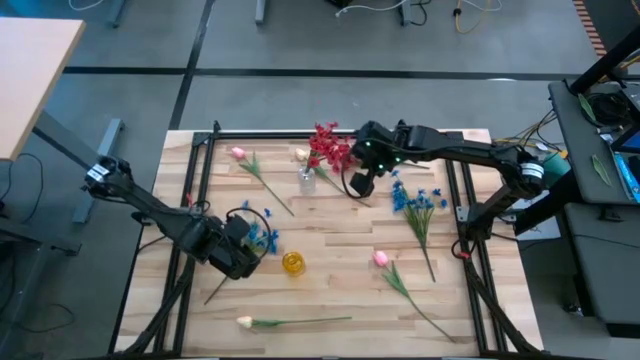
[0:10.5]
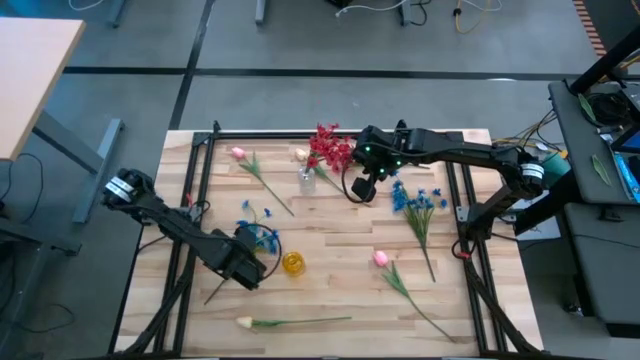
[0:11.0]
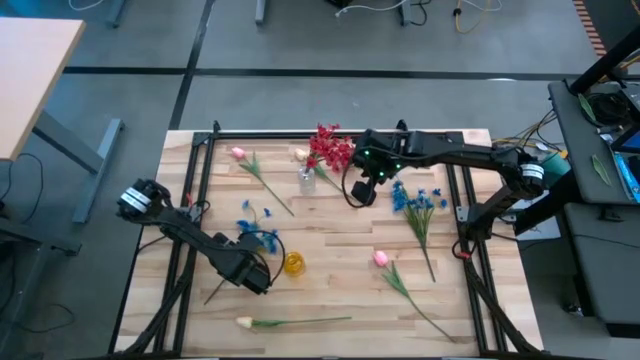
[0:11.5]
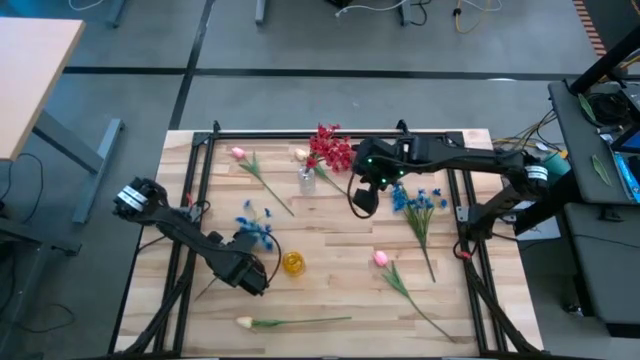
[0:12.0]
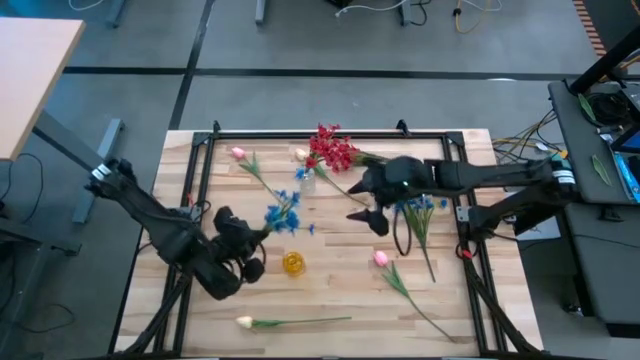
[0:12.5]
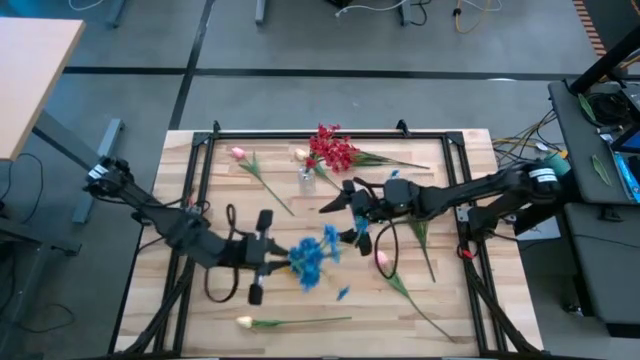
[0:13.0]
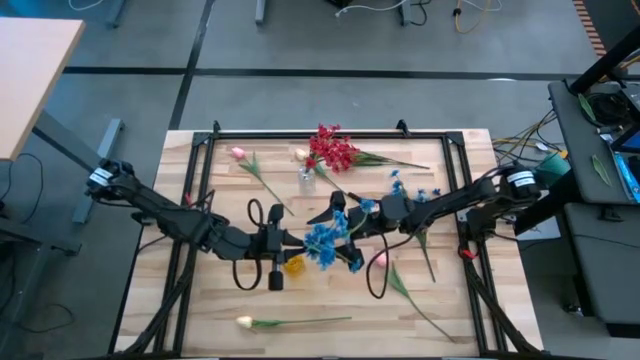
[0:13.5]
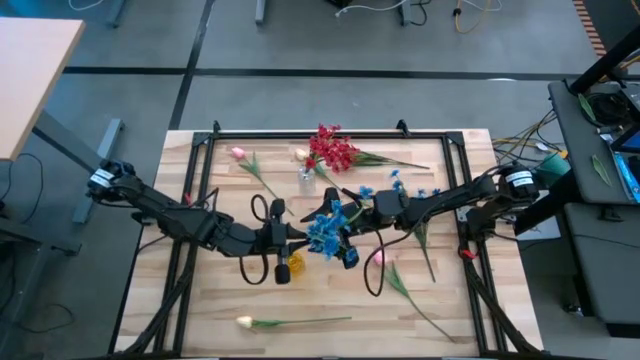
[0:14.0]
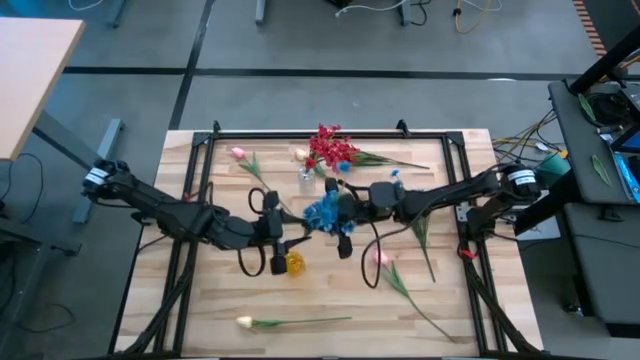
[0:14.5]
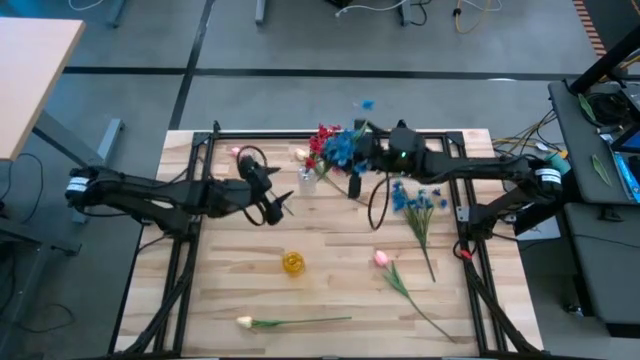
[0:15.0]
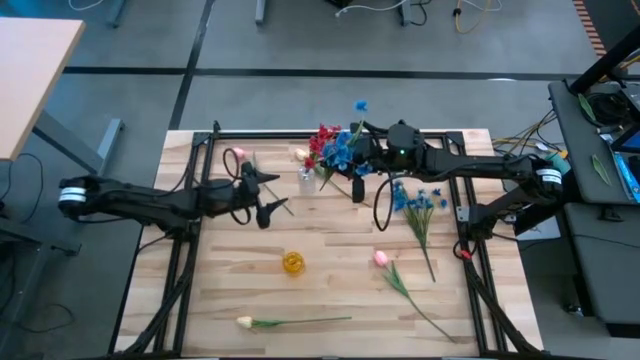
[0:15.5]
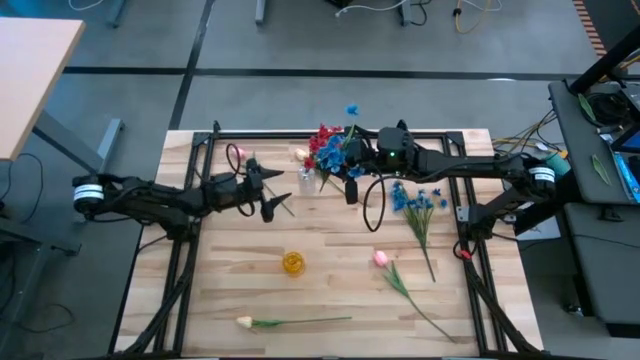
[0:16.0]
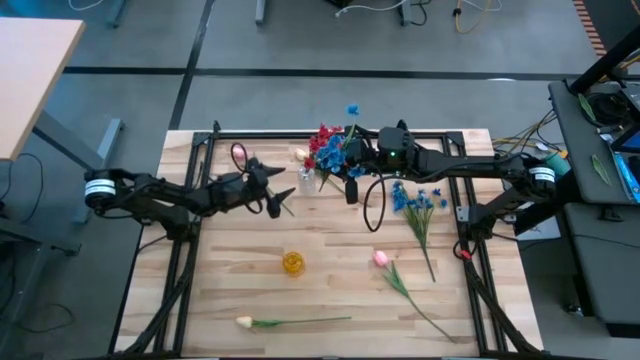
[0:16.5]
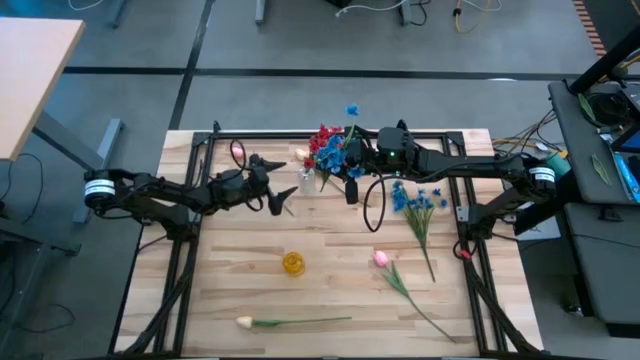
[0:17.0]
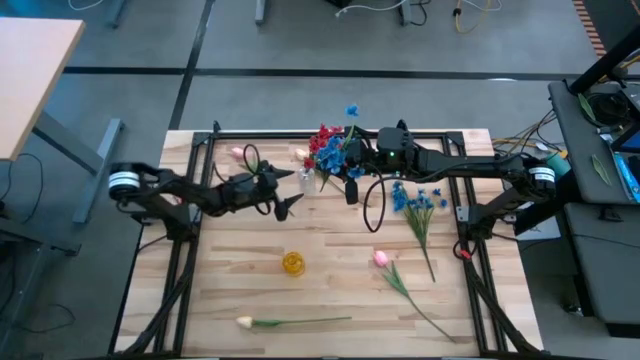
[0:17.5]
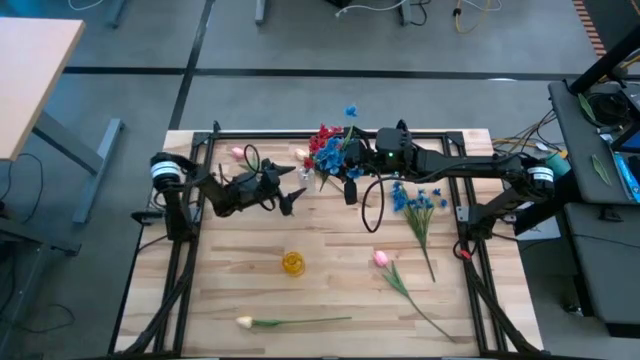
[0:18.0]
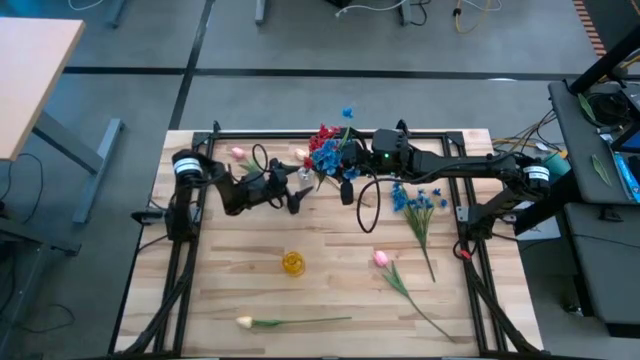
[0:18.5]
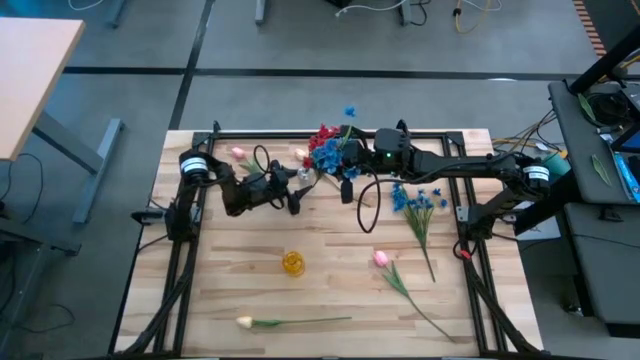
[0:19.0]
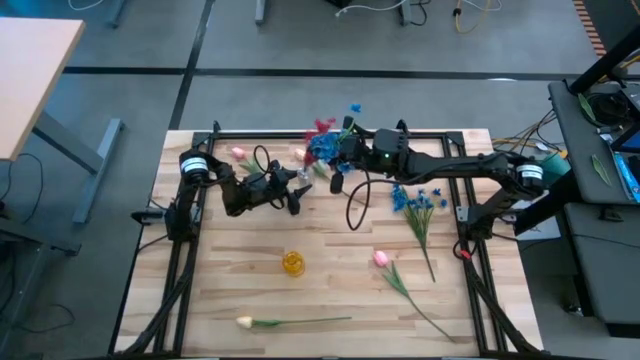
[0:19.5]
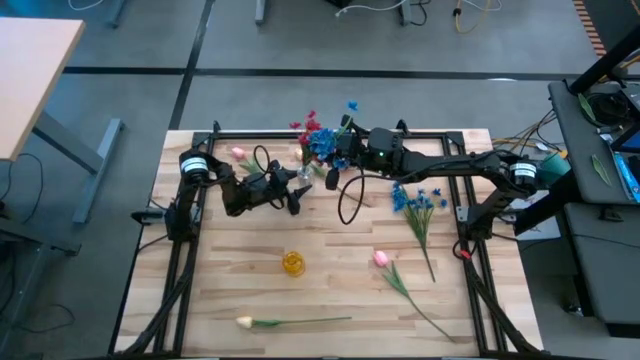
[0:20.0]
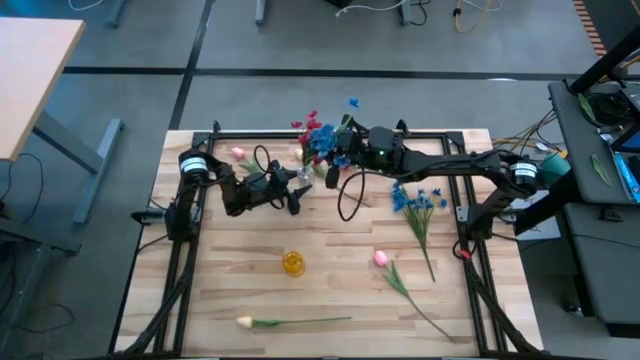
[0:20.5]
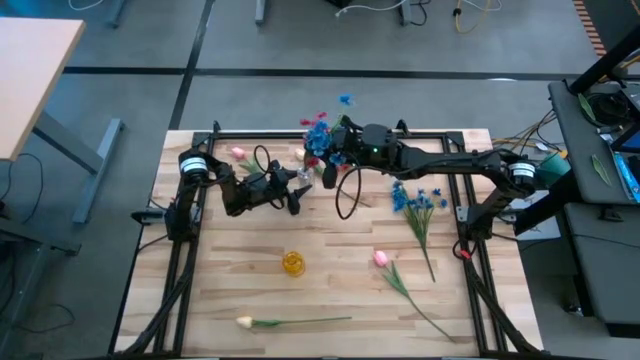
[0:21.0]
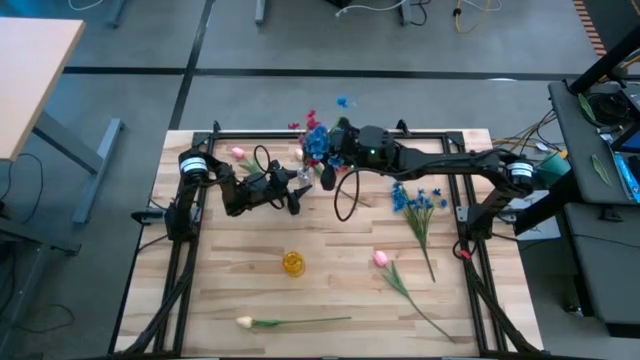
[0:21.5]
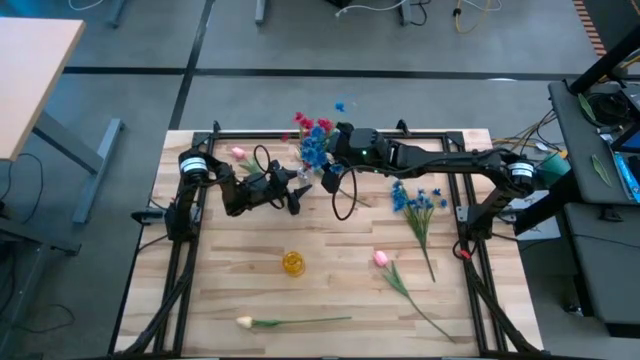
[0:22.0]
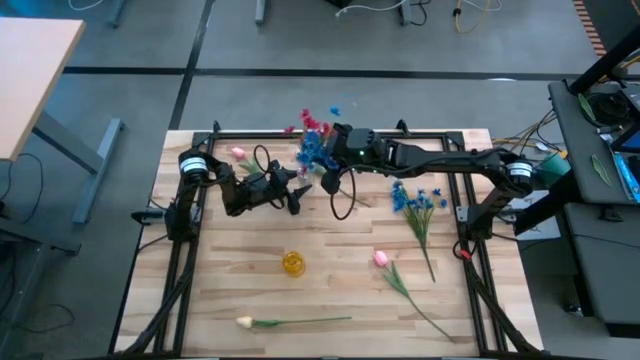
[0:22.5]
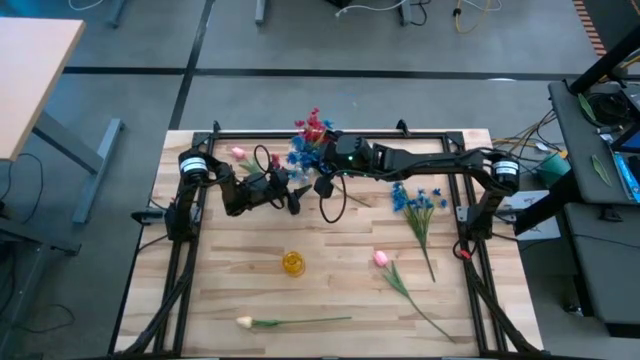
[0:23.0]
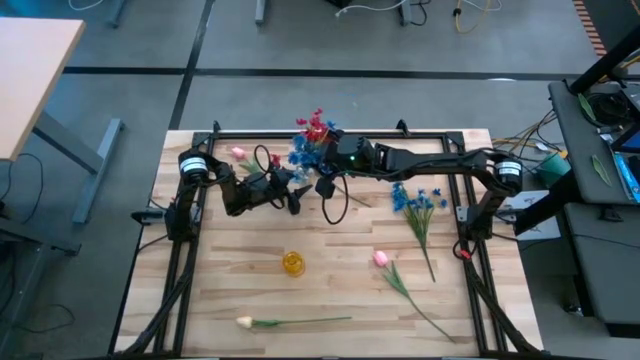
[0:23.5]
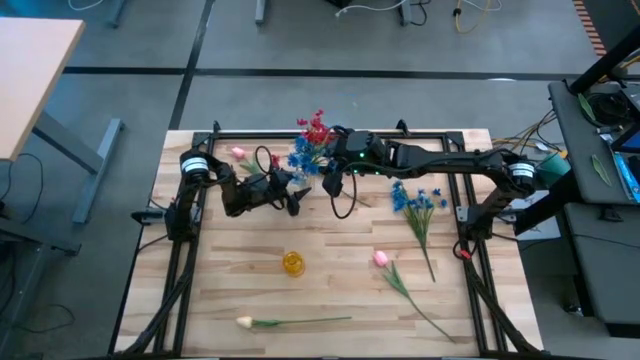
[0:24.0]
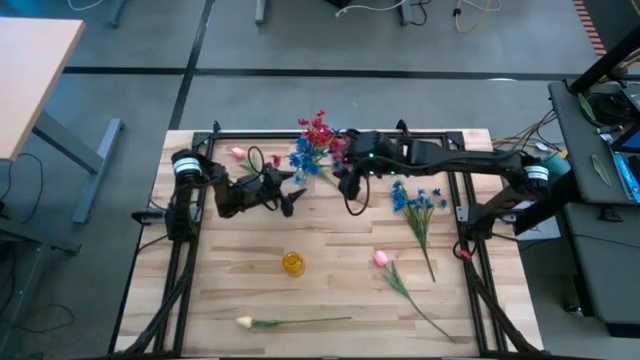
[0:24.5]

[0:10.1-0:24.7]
Task: Sort flowers into vase by color
Put the left blue flowers into the transparent vase

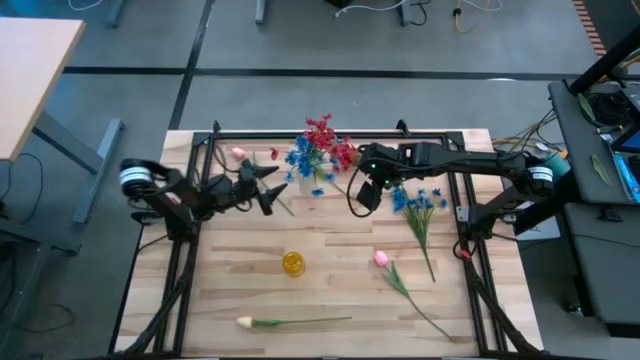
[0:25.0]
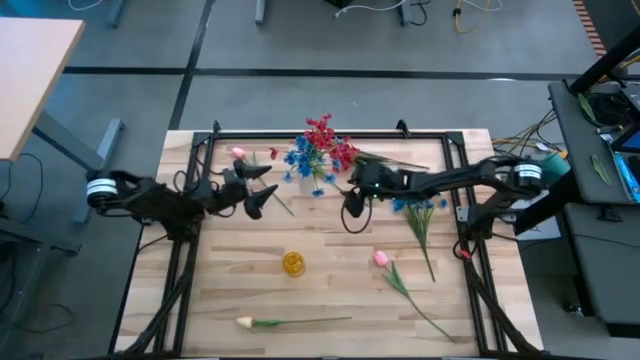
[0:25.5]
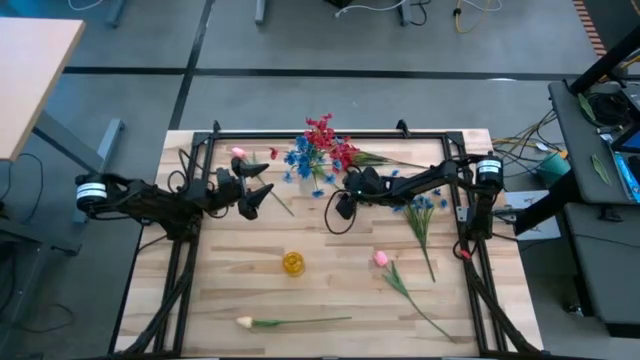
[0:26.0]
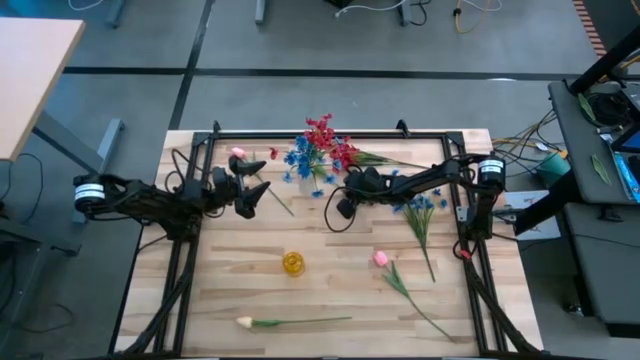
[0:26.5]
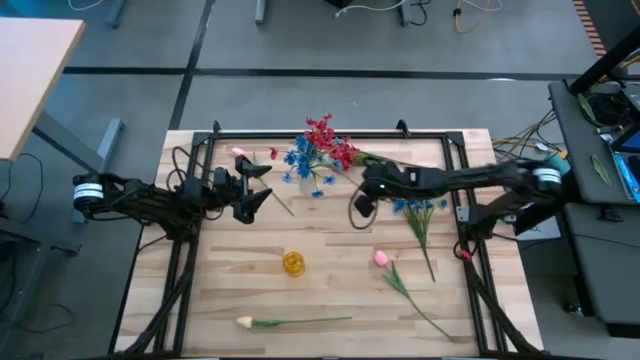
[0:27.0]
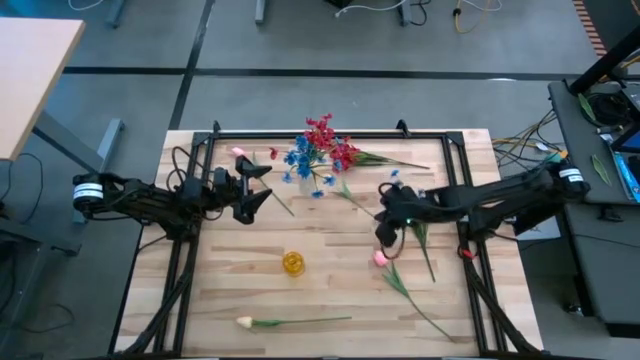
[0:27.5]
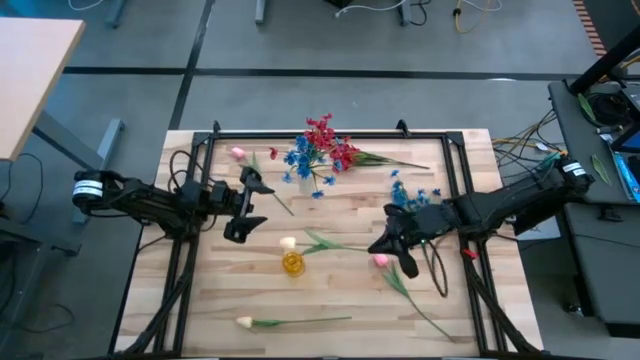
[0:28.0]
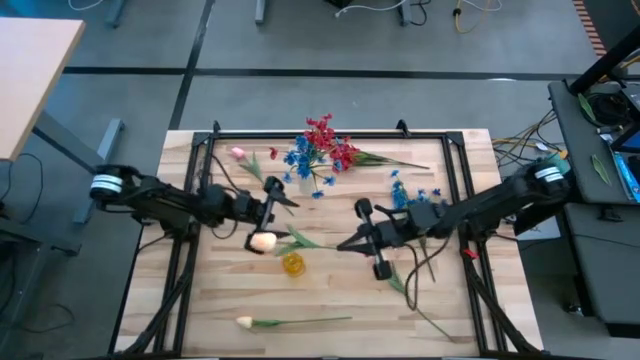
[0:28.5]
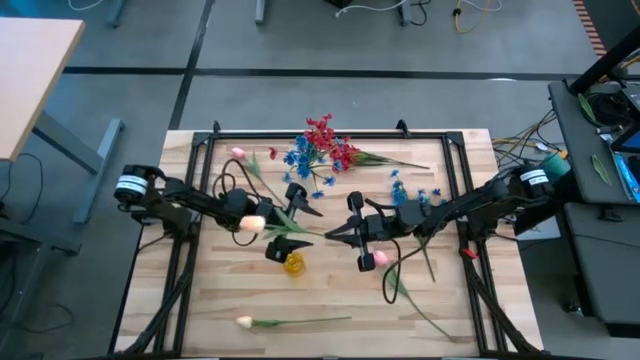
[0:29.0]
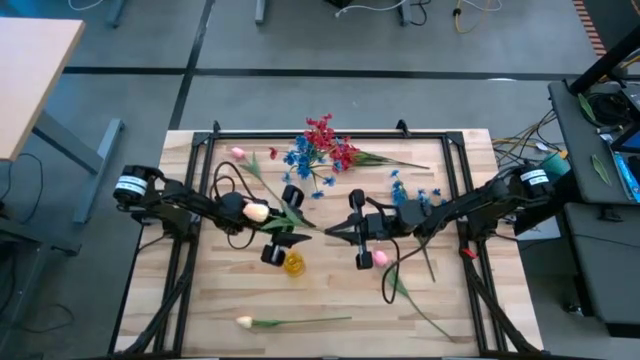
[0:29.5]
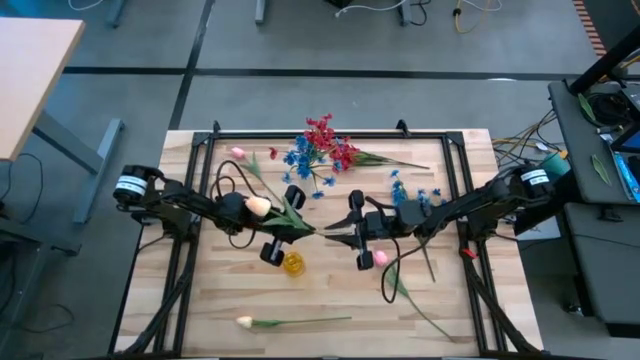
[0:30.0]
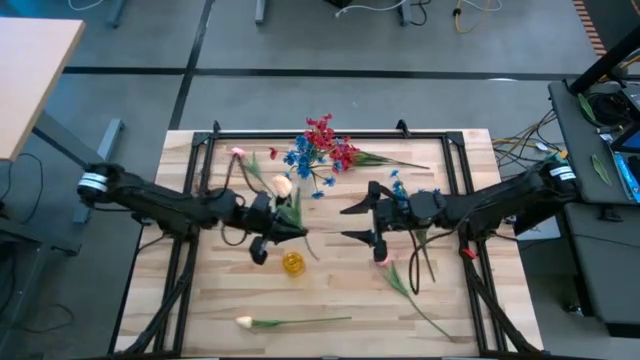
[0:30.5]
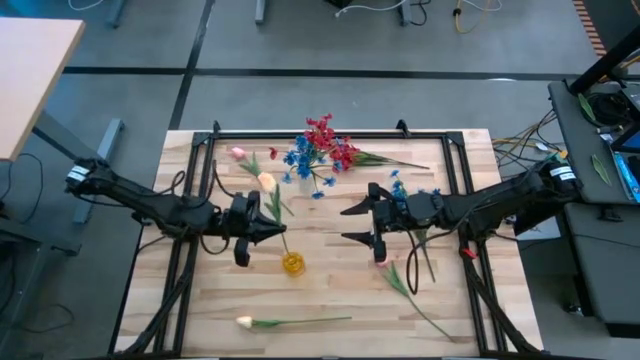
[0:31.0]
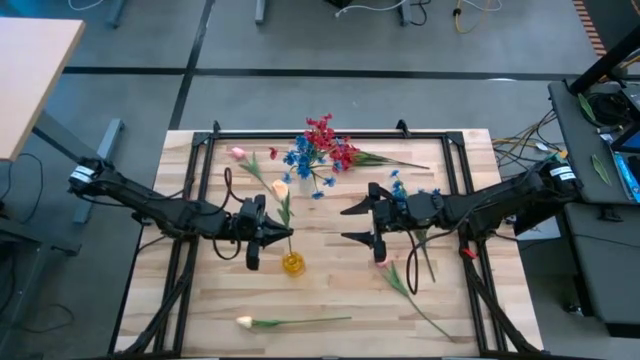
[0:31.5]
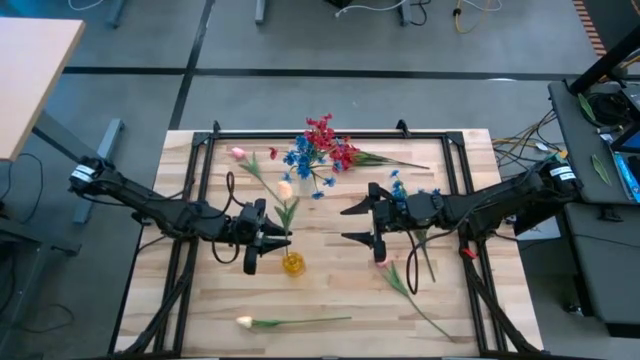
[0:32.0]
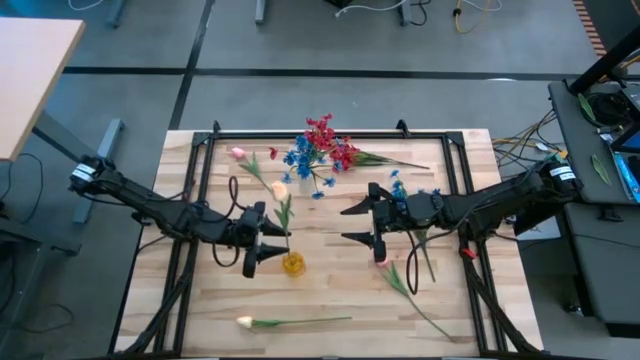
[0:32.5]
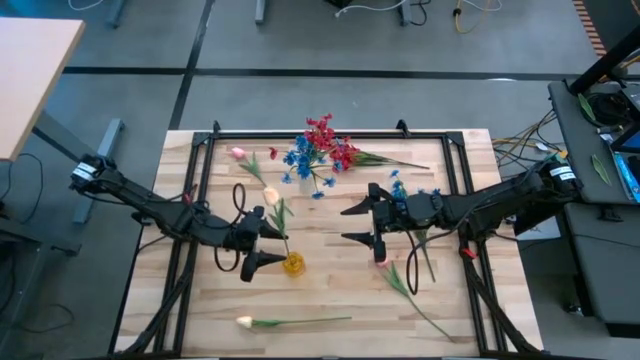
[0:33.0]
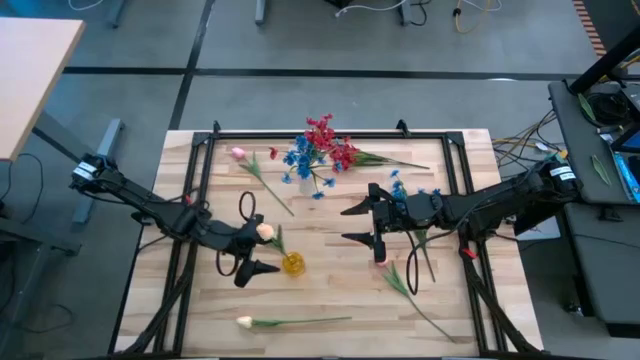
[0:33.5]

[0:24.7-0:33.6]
Put the light yellow tulip into the yellow vase
